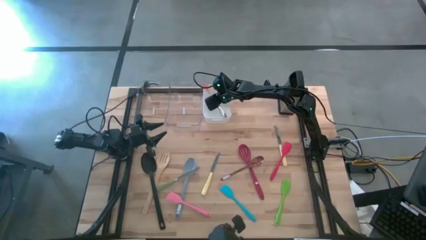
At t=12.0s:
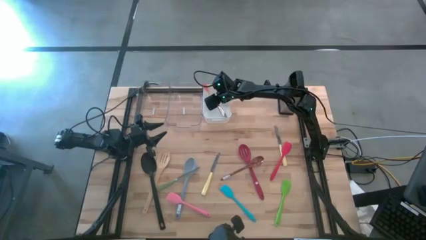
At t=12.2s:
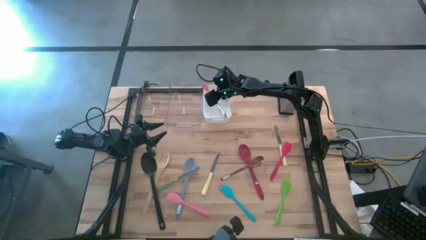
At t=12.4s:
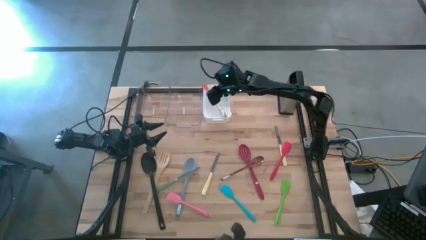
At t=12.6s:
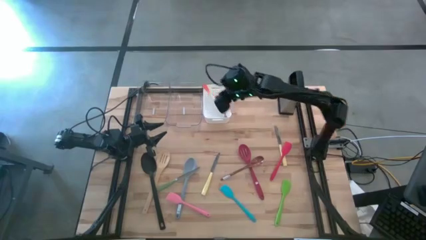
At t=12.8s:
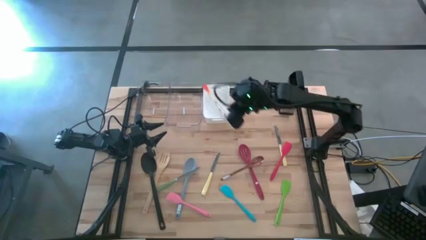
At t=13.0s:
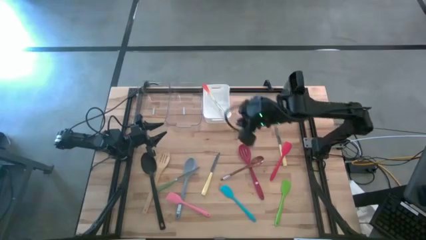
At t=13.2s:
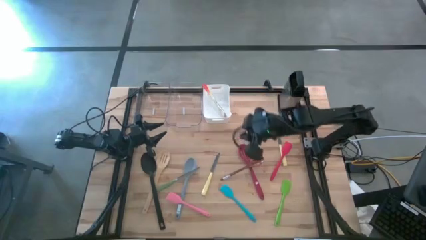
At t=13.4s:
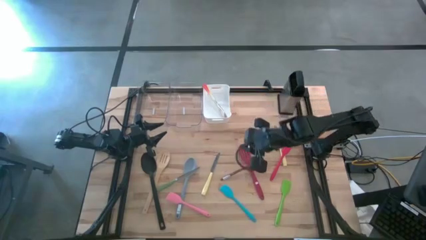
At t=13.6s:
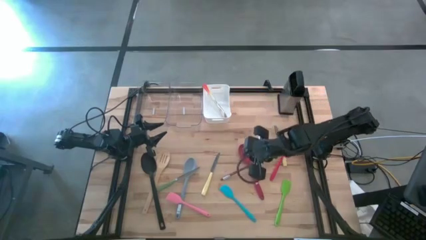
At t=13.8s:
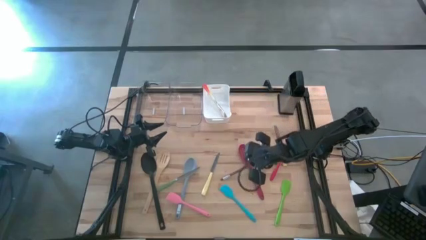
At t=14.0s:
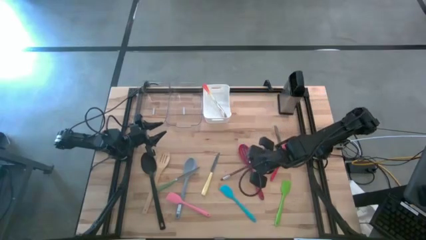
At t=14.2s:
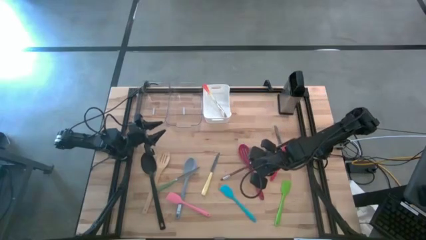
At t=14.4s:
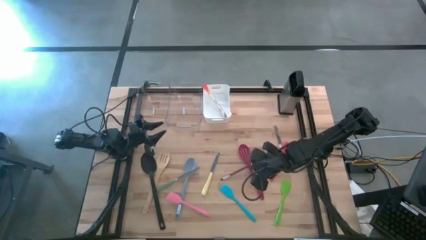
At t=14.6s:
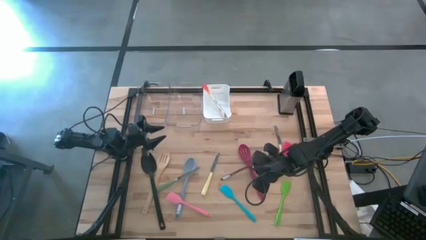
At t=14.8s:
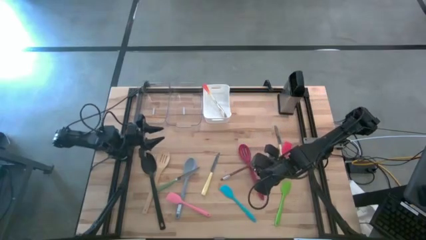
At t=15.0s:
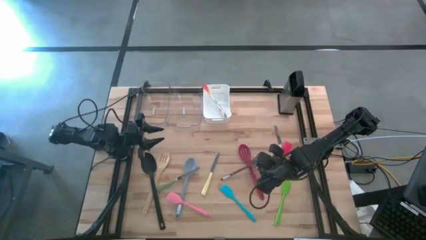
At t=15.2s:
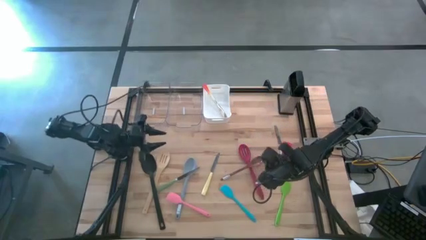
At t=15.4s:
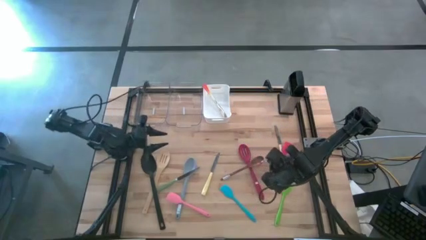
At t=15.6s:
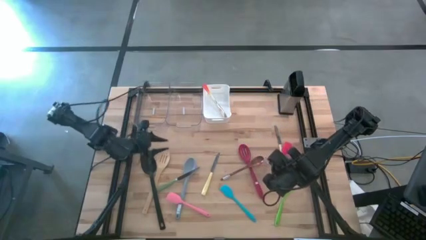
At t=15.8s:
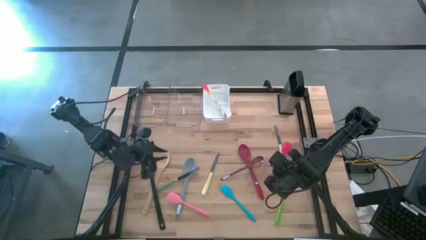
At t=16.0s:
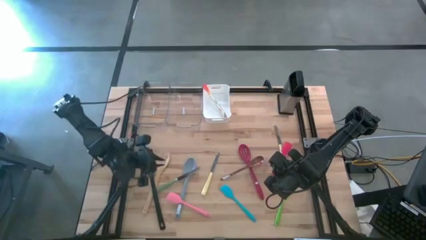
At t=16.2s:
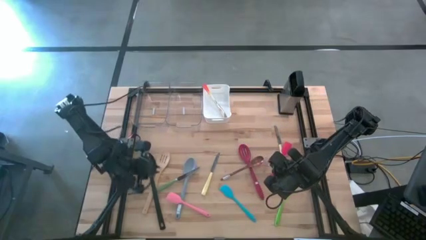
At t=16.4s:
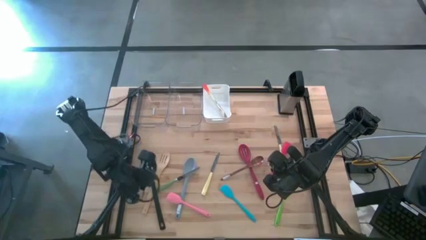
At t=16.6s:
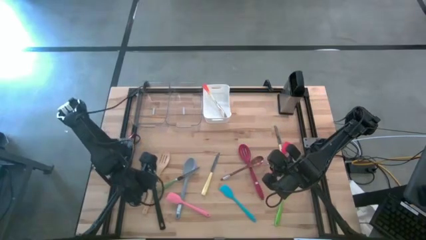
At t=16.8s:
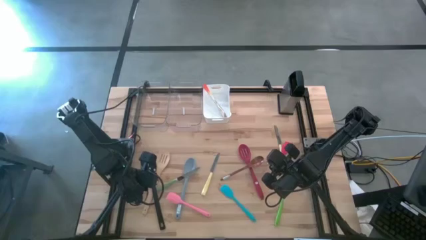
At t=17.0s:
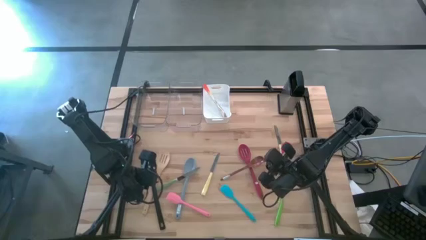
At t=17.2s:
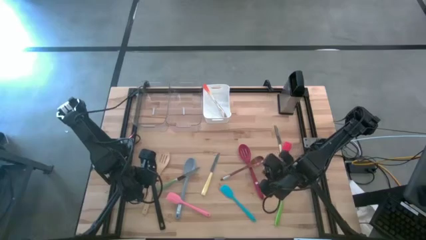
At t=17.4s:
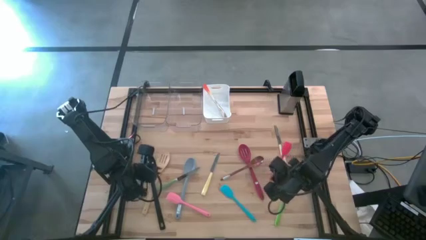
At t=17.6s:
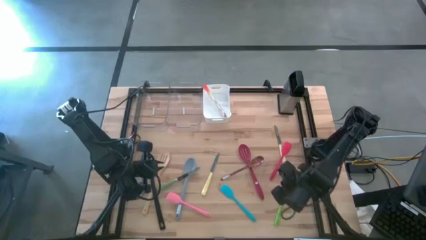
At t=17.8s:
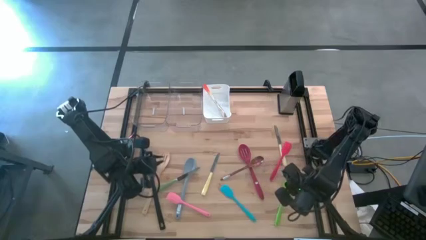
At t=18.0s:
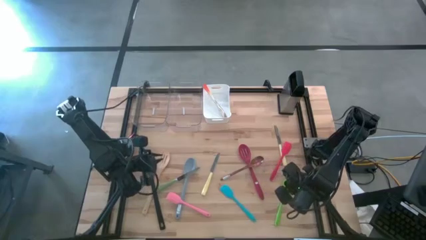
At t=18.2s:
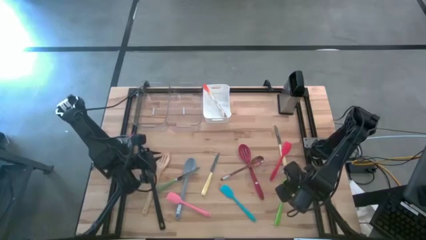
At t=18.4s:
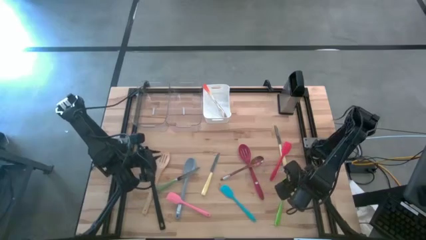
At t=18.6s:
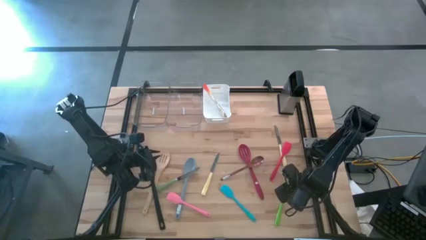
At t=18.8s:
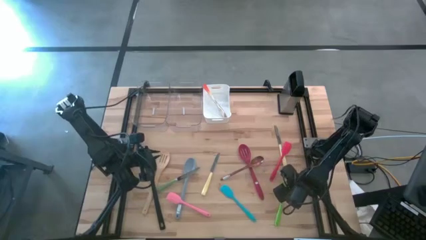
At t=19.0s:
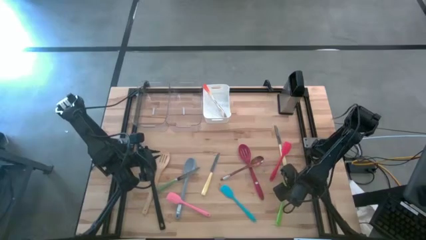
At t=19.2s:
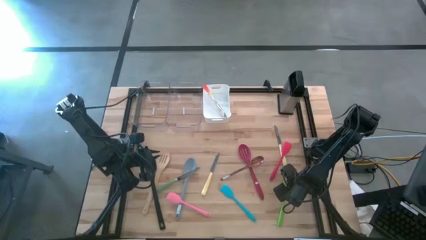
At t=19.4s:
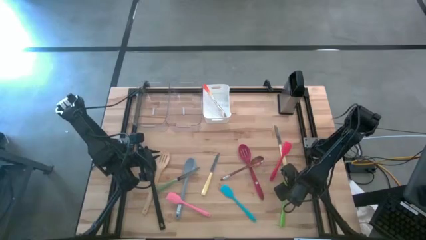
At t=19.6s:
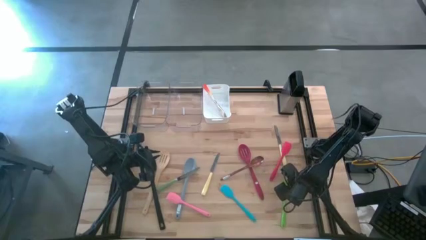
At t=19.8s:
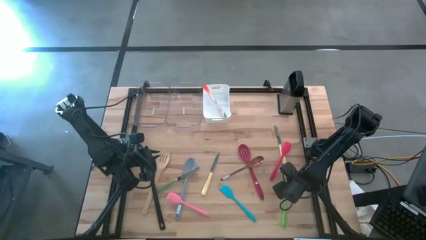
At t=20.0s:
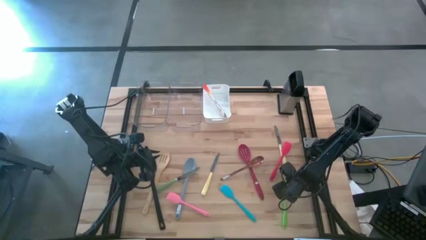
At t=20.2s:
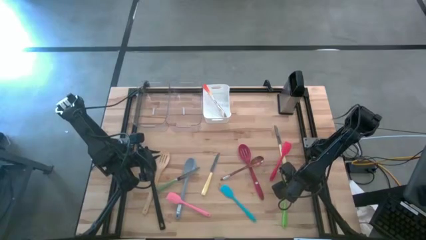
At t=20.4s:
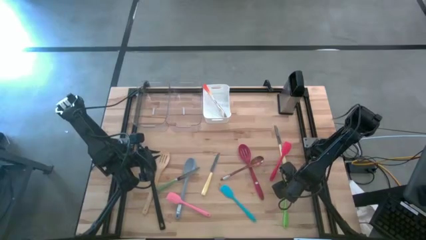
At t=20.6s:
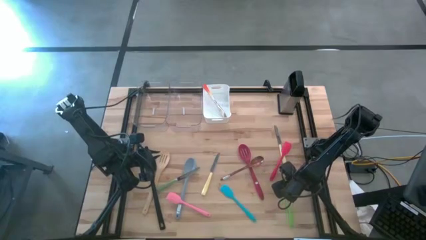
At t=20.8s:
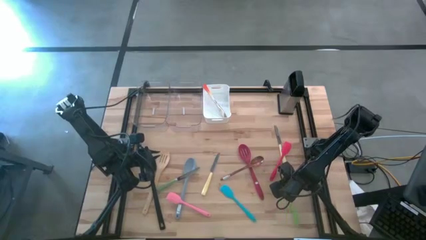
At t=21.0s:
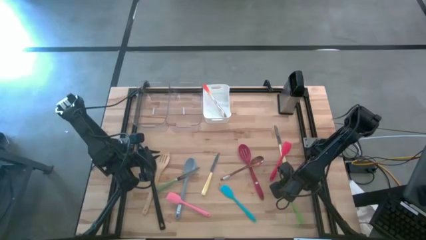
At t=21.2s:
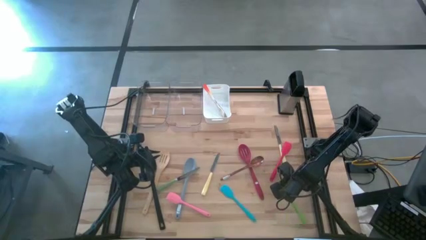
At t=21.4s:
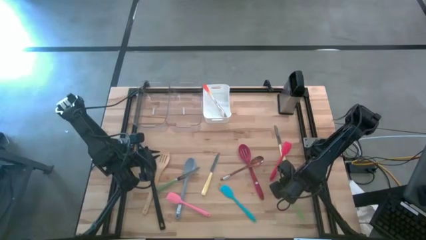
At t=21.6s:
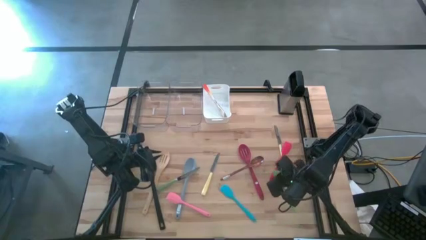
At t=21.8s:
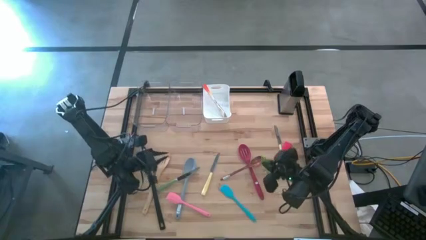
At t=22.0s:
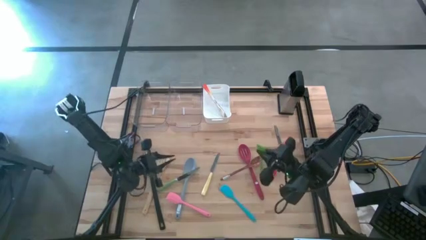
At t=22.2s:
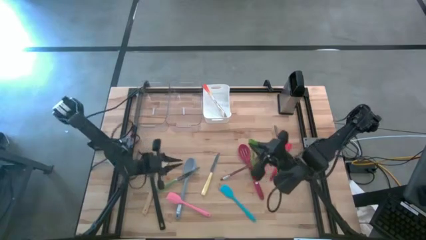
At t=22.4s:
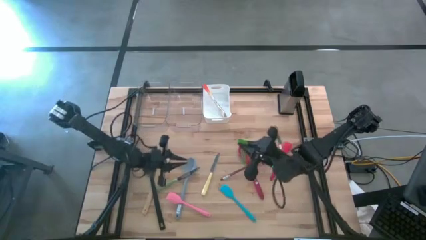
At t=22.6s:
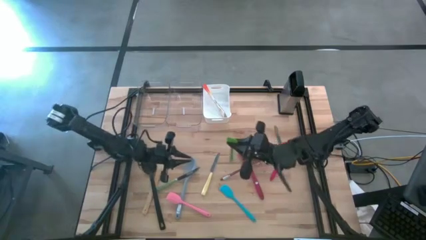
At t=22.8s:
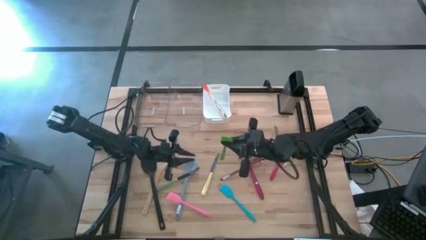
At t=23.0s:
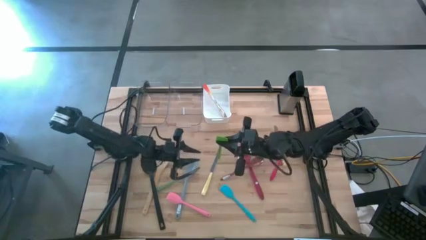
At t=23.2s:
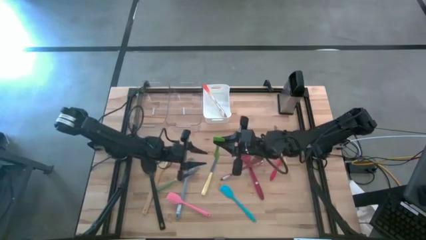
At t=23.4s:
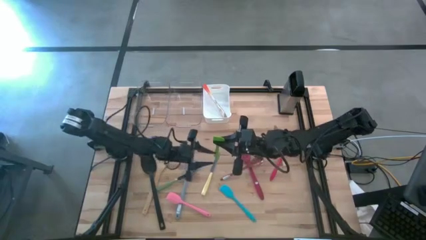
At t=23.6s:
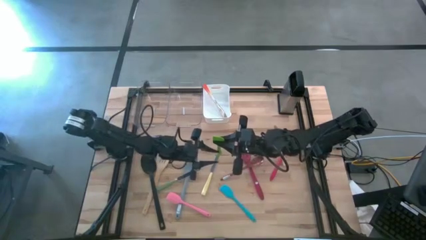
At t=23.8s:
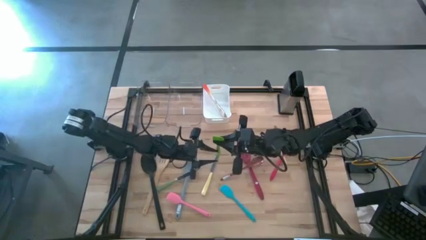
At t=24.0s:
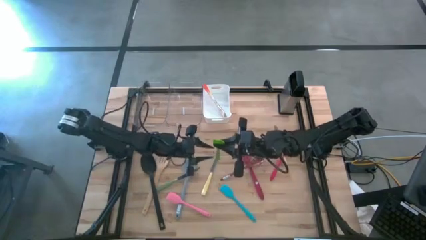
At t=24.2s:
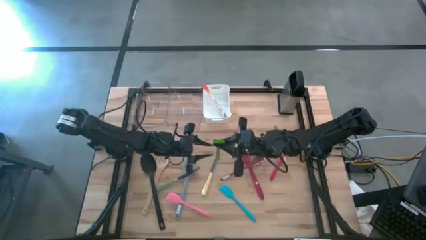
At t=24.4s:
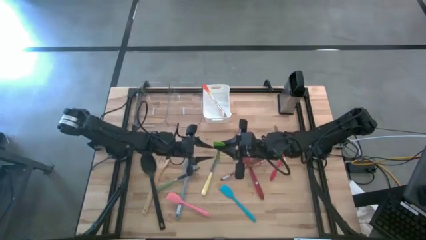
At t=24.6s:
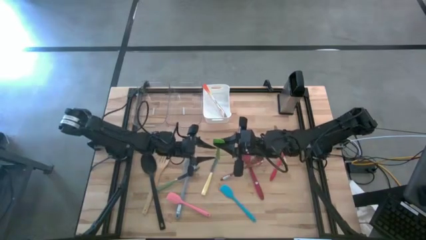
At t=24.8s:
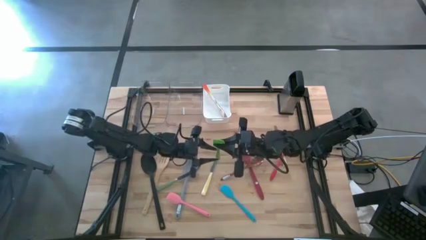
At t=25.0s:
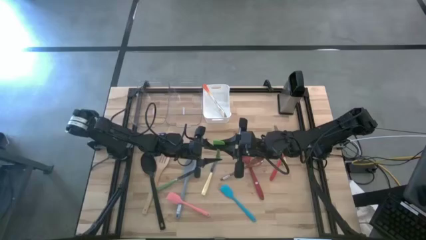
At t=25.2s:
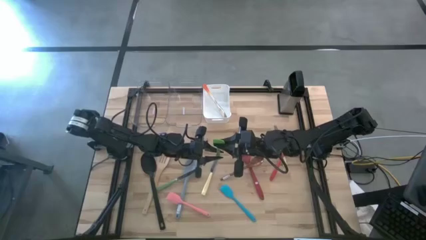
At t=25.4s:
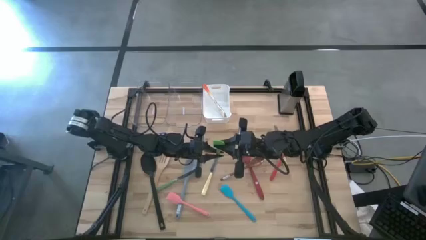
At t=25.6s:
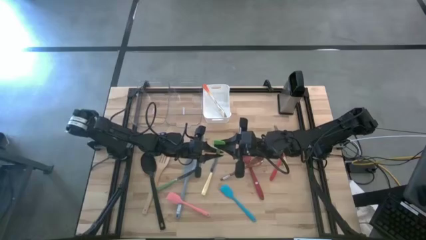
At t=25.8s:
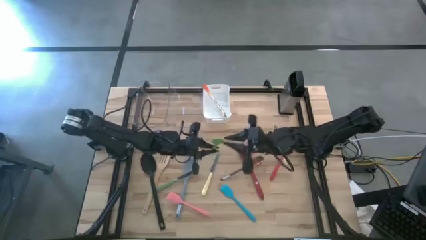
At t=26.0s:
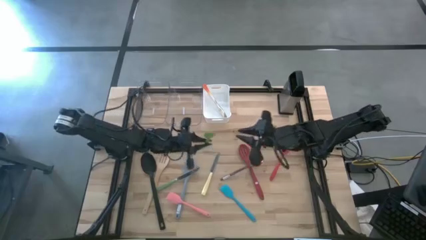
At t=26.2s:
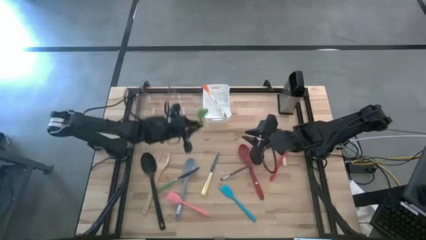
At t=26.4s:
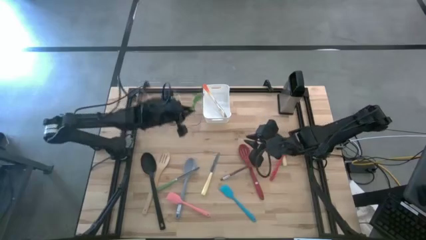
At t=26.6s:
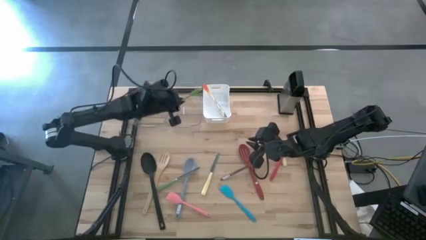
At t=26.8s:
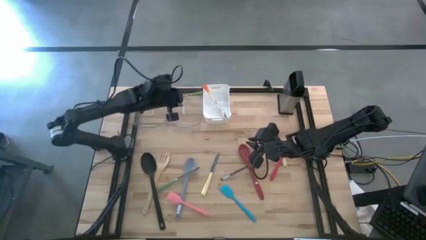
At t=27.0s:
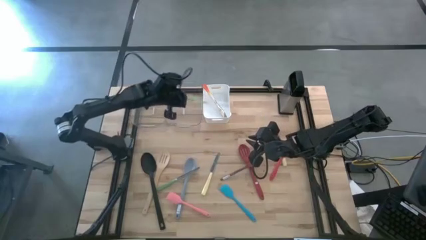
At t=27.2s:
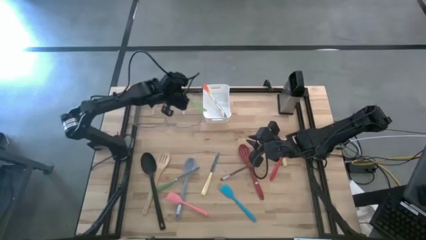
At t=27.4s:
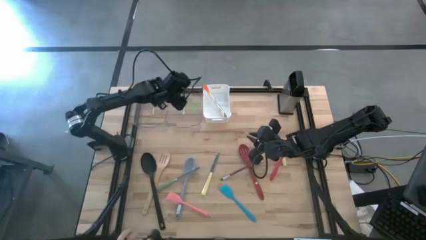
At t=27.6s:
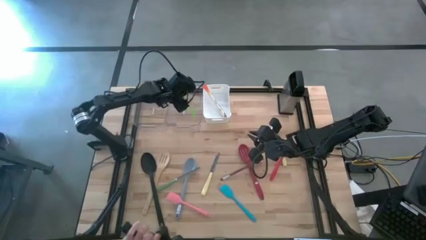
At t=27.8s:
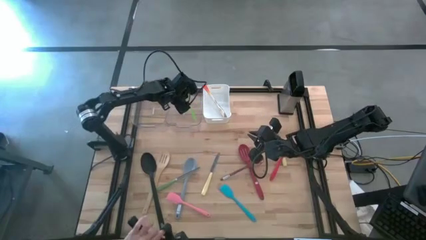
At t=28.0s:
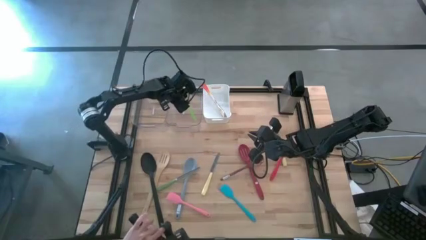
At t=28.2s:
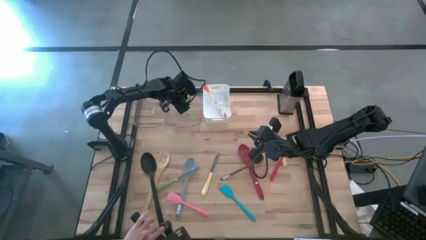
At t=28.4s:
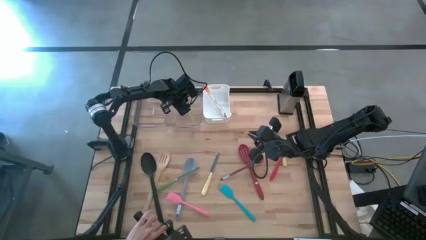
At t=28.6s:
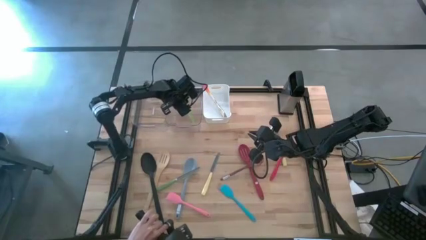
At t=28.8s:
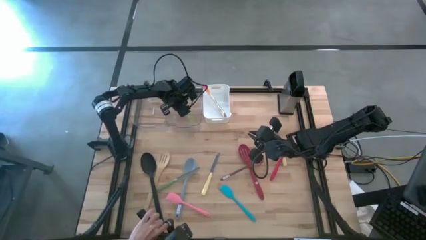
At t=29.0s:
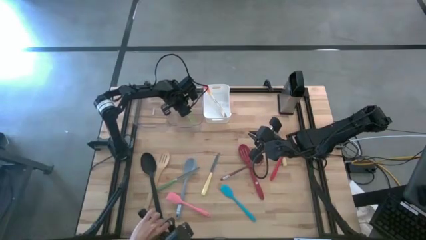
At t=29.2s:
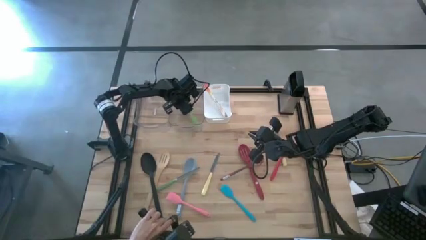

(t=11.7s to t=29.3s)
Task: Pick & Place Kitchen Items
Put the green spatula into the right transparent bin
